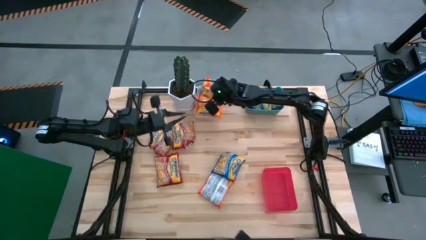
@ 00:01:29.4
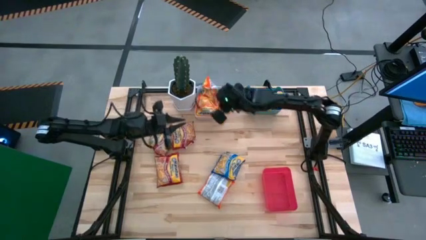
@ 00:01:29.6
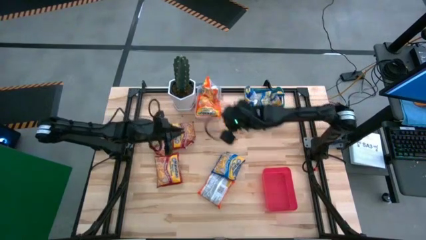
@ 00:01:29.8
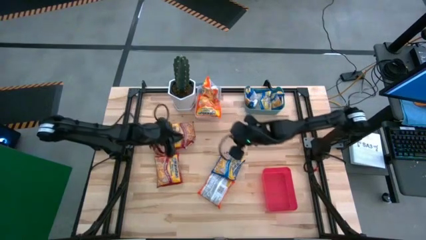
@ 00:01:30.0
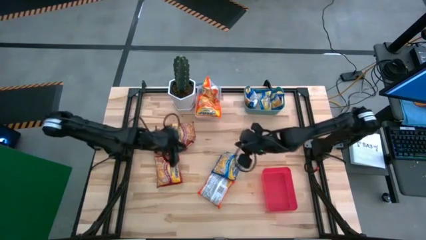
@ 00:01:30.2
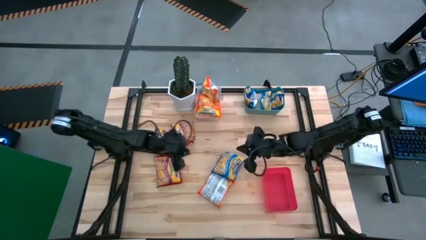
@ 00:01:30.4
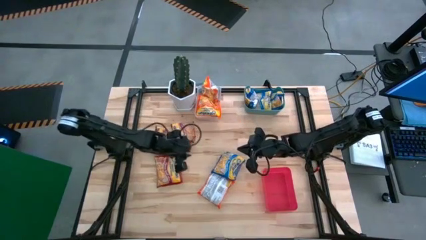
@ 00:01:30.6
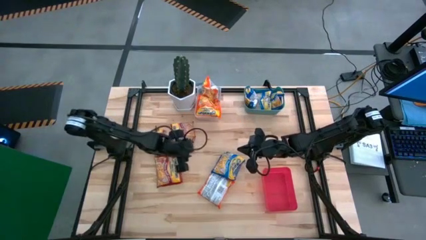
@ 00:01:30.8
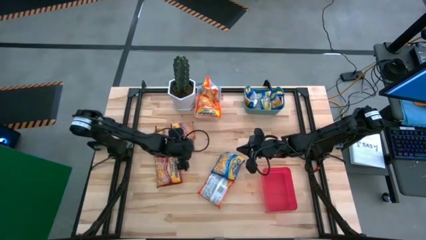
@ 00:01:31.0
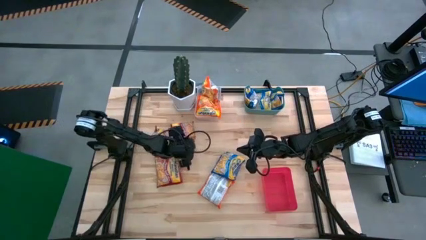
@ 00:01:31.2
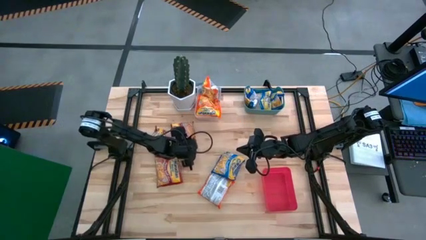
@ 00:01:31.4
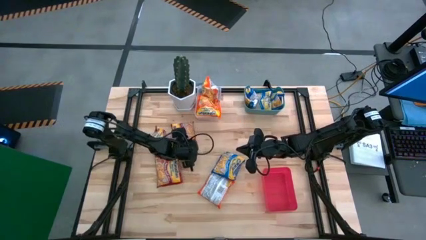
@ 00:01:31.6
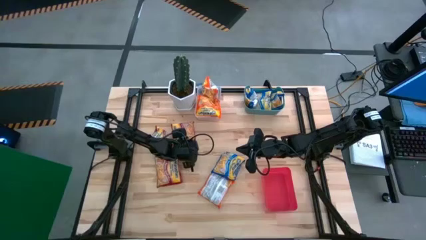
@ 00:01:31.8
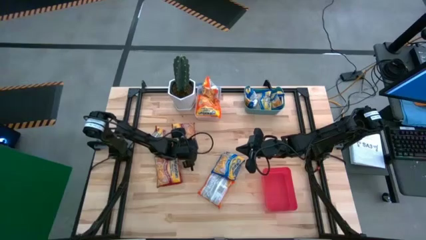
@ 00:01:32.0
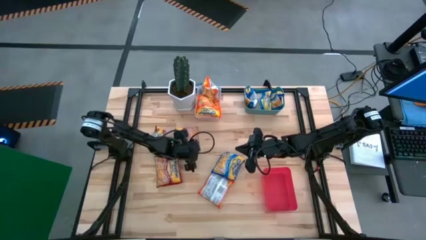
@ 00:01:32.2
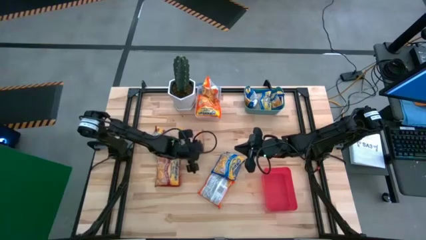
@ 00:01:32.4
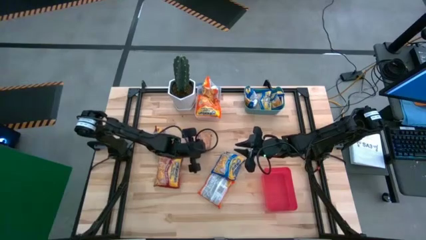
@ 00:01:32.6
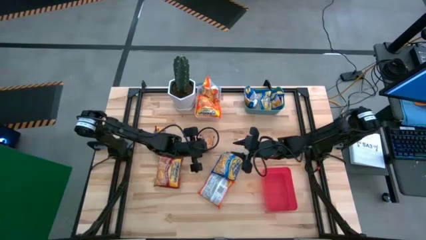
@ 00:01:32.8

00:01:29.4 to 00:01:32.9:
Task: Sort Maruchan noodles
Put the red noodle pack into the red bin

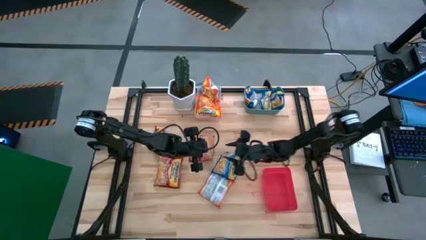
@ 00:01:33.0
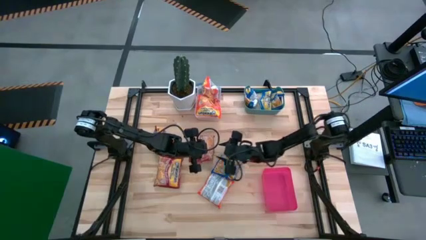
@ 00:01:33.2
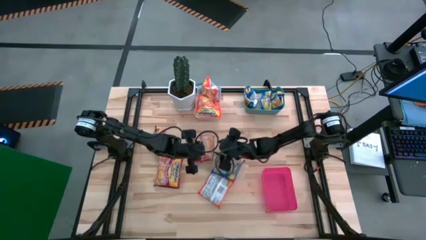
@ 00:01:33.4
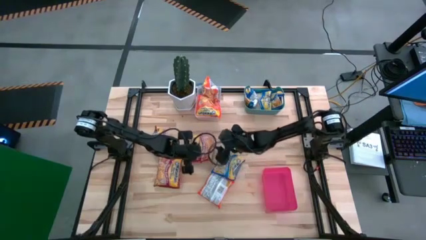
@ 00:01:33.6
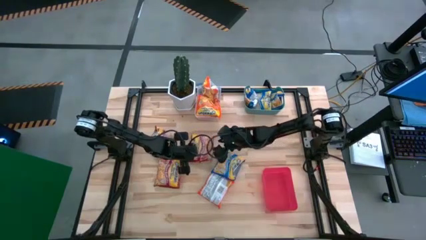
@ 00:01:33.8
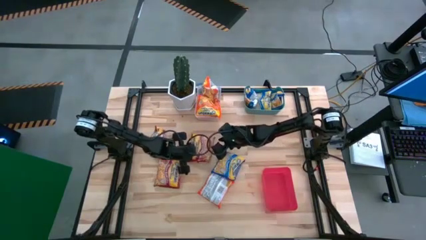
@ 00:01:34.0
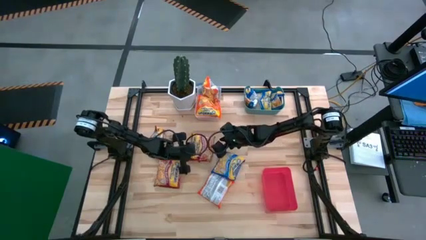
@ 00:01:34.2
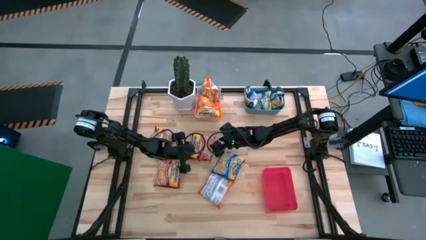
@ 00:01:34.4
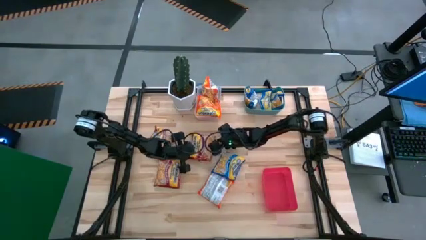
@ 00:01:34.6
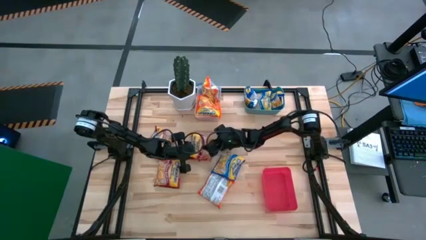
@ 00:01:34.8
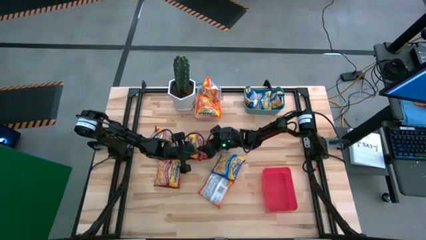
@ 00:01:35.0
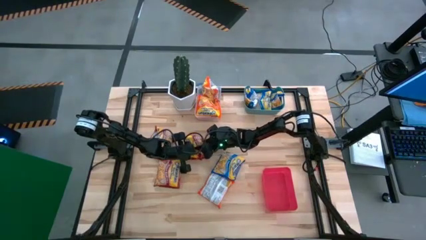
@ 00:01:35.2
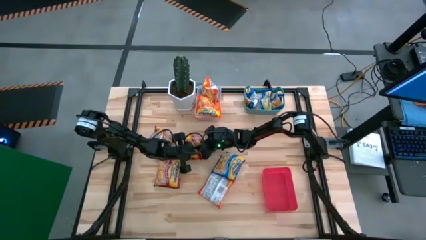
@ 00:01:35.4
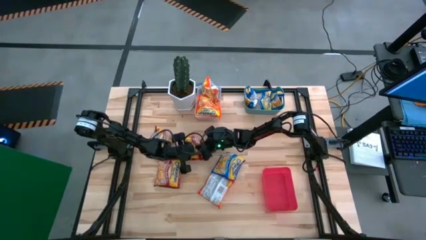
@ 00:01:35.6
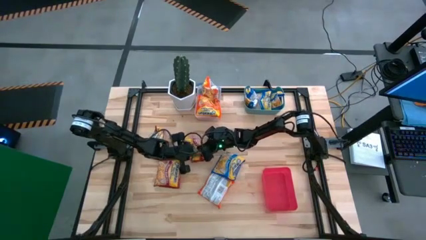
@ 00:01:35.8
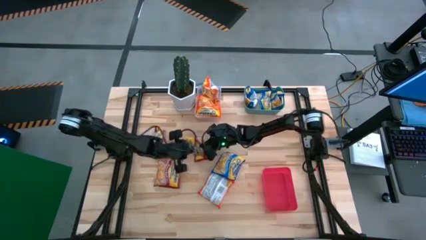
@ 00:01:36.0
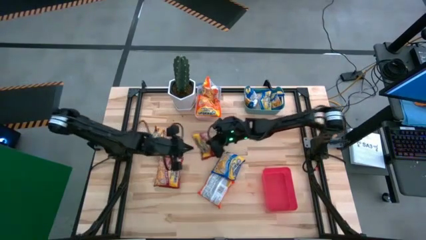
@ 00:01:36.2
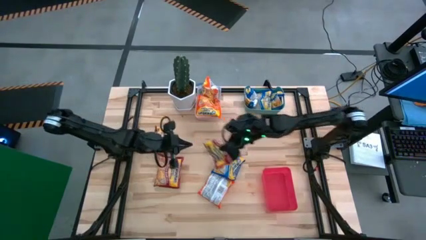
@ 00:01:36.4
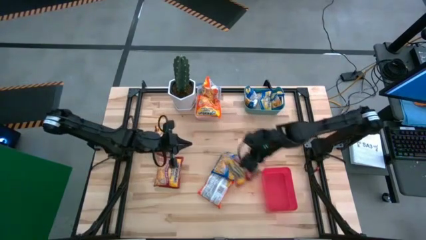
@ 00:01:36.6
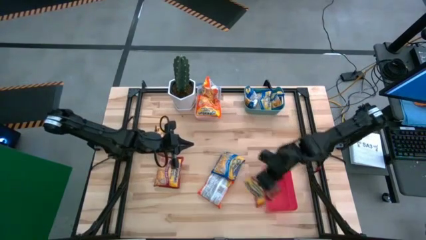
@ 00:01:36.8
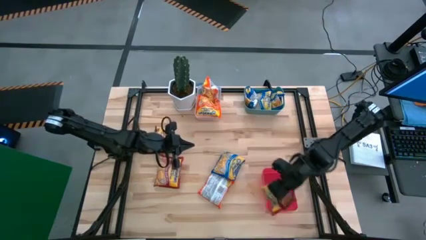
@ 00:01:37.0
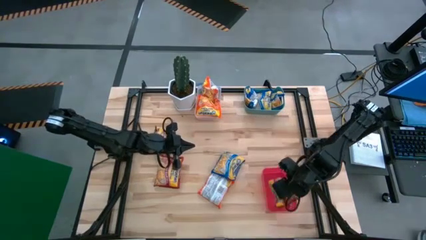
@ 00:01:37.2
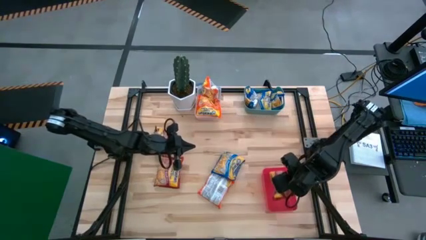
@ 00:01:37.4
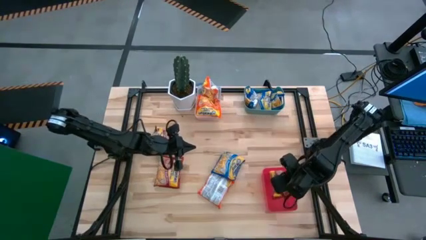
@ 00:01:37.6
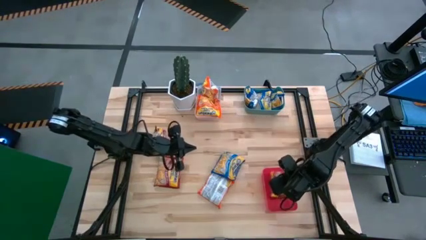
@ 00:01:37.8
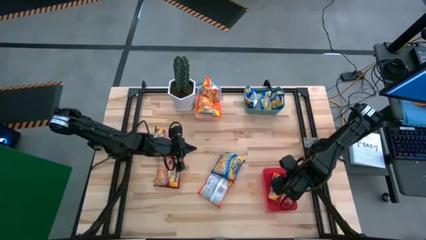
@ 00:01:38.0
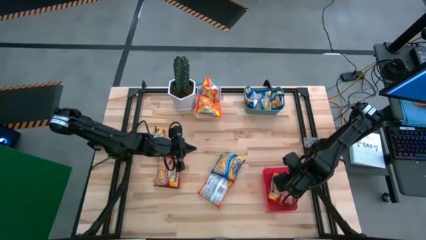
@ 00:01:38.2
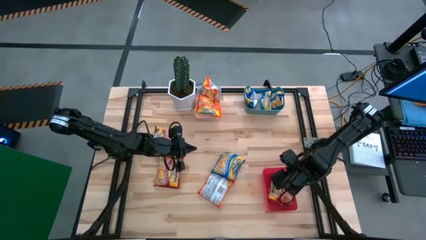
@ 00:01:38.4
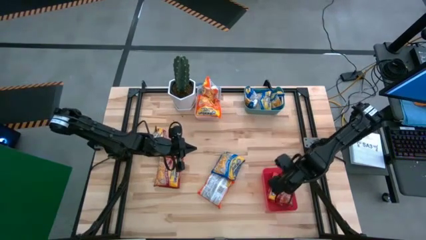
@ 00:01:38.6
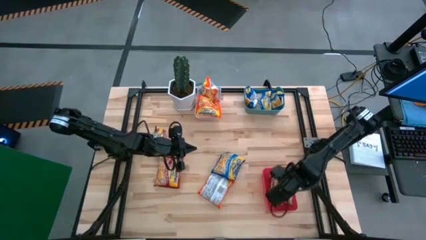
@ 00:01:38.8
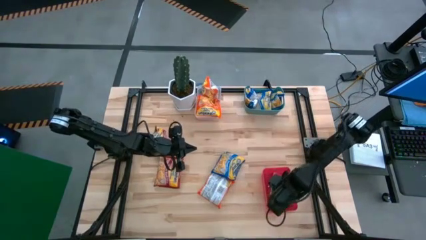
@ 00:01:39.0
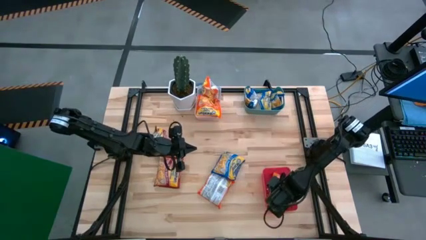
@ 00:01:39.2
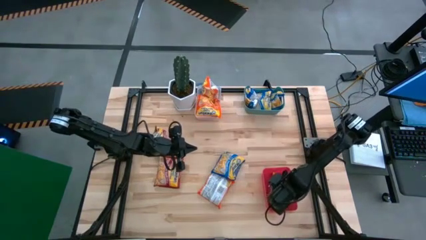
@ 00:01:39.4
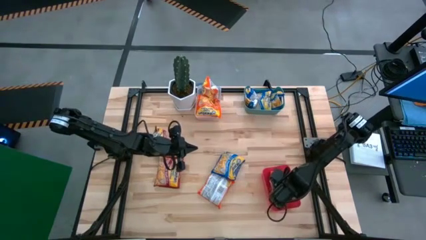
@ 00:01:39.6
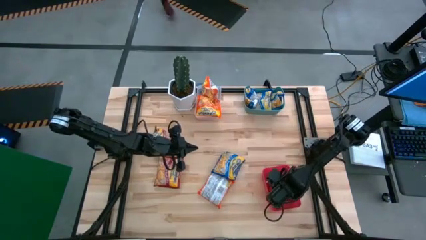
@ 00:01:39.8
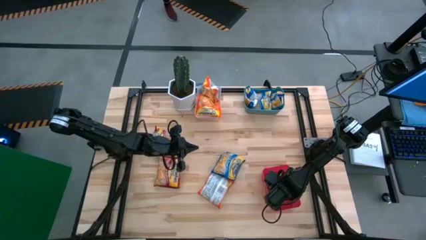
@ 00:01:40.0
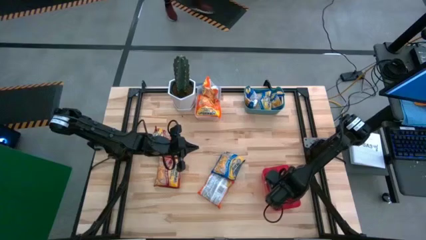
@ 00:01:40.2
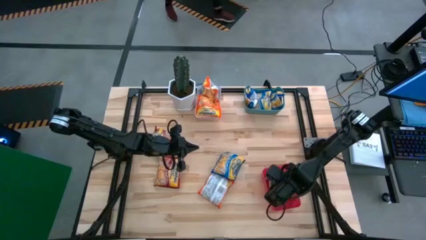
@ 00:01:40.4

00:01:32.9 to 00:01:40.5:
Put the red noodle pack into the red bin
